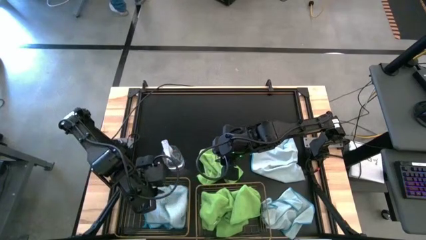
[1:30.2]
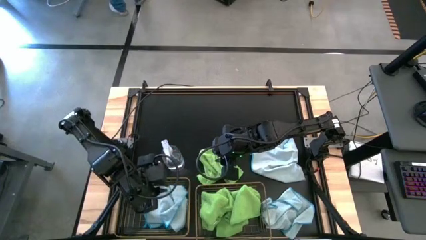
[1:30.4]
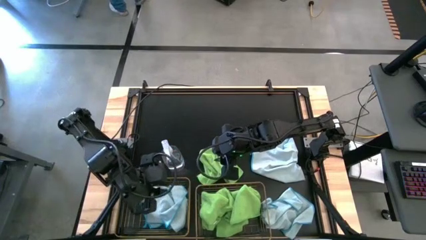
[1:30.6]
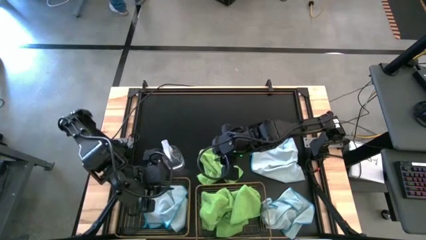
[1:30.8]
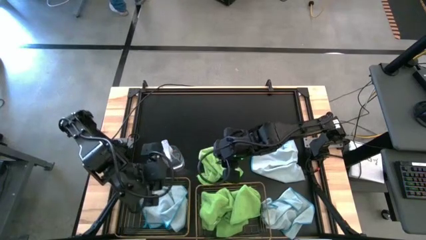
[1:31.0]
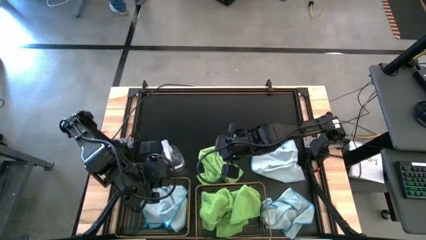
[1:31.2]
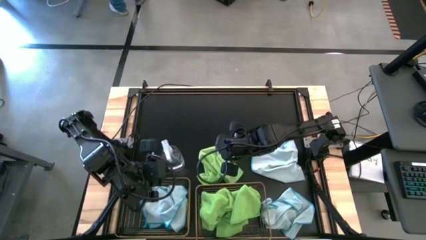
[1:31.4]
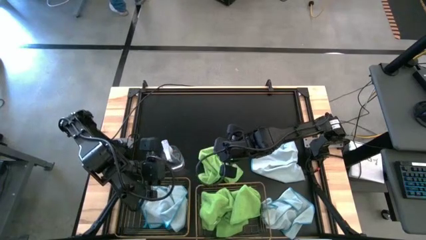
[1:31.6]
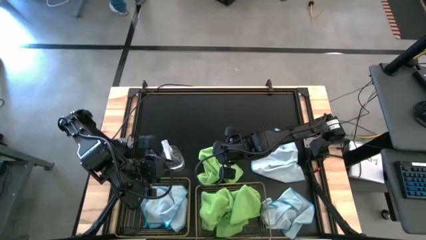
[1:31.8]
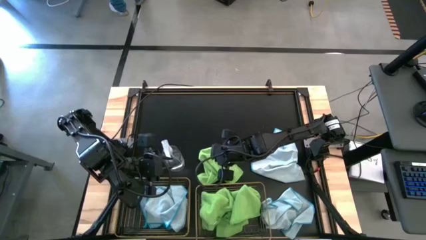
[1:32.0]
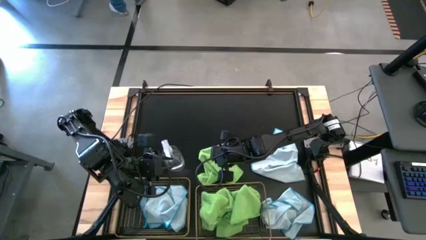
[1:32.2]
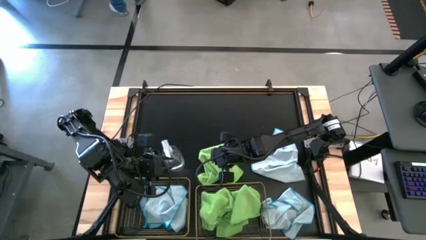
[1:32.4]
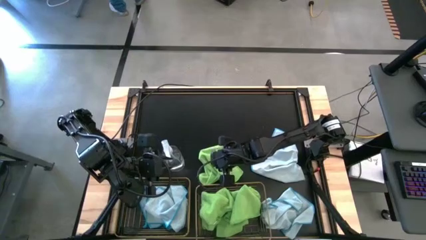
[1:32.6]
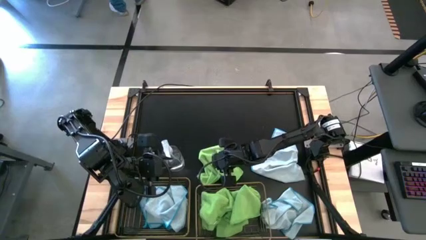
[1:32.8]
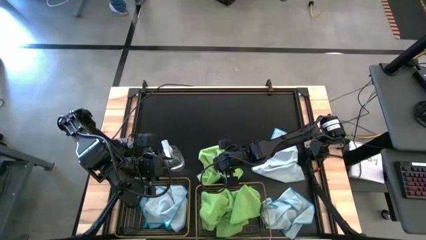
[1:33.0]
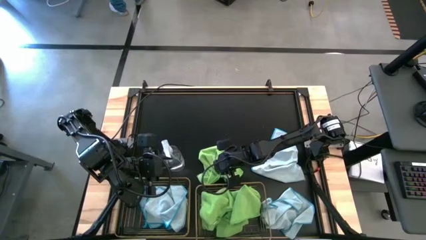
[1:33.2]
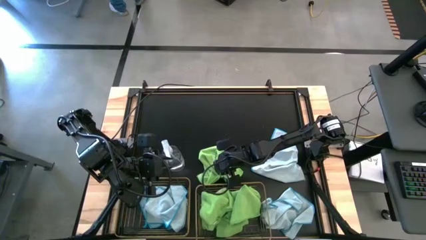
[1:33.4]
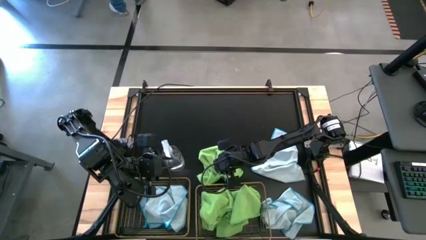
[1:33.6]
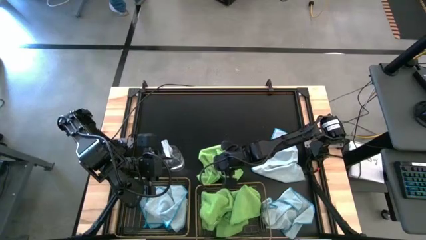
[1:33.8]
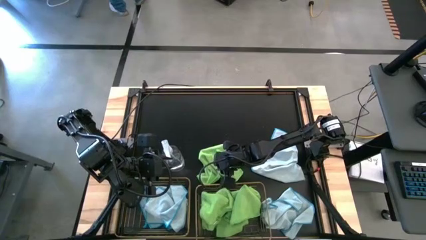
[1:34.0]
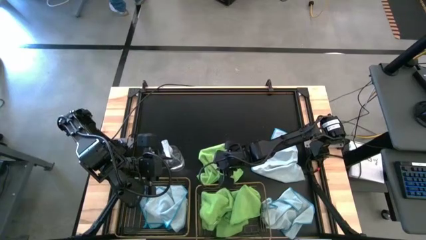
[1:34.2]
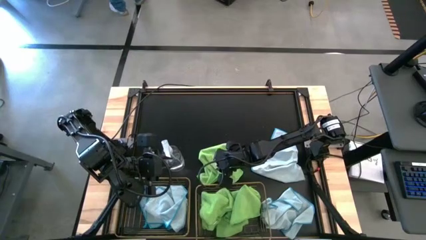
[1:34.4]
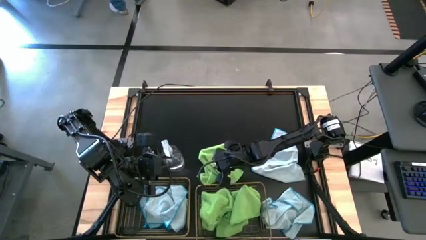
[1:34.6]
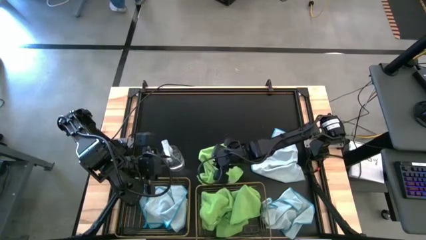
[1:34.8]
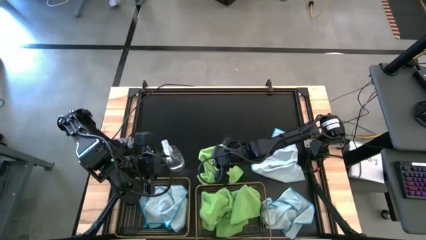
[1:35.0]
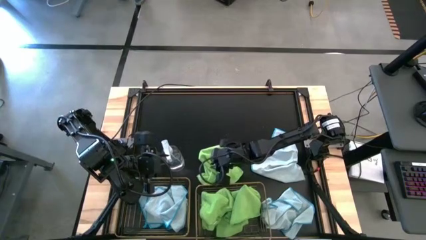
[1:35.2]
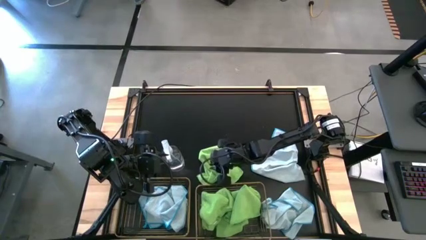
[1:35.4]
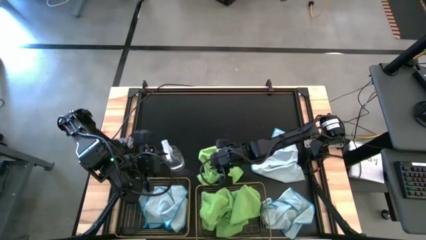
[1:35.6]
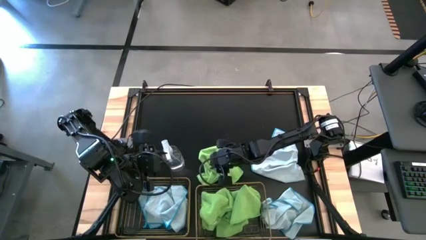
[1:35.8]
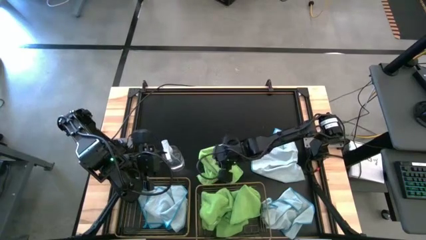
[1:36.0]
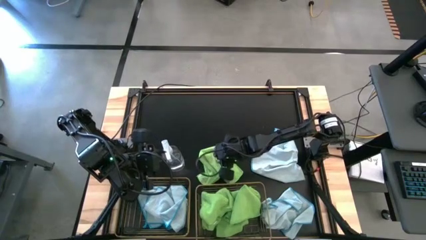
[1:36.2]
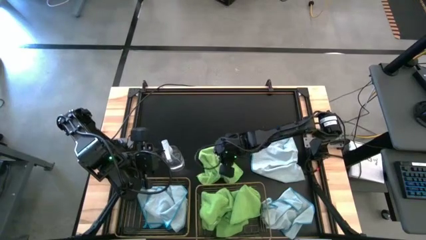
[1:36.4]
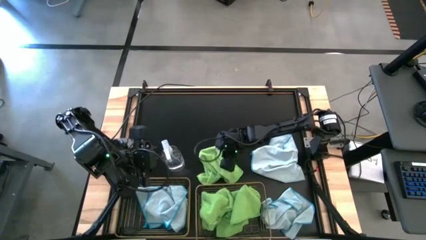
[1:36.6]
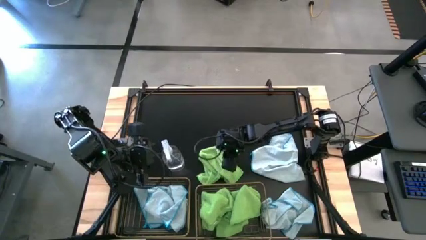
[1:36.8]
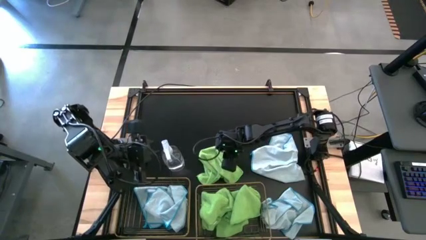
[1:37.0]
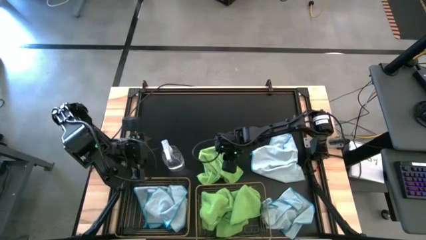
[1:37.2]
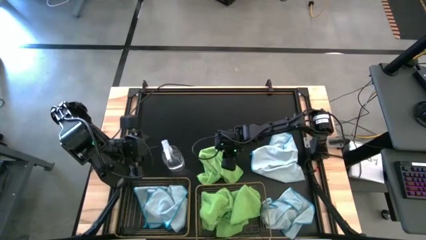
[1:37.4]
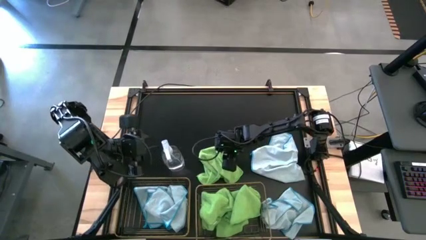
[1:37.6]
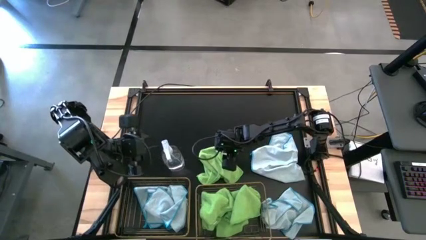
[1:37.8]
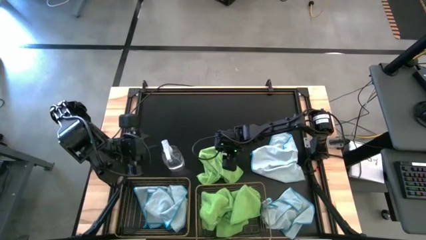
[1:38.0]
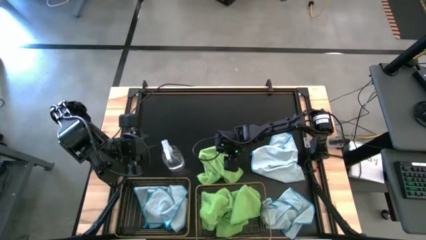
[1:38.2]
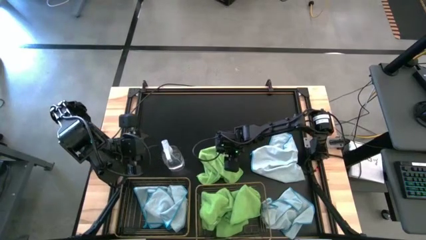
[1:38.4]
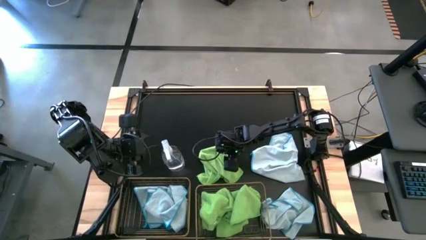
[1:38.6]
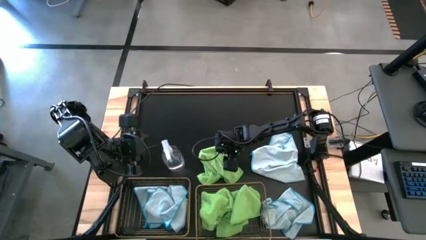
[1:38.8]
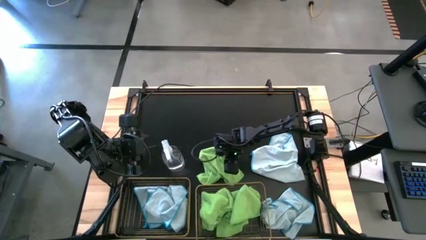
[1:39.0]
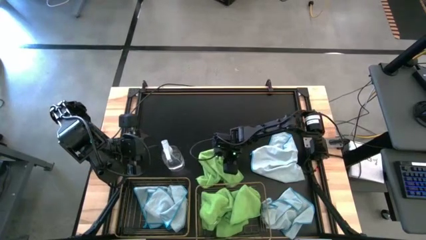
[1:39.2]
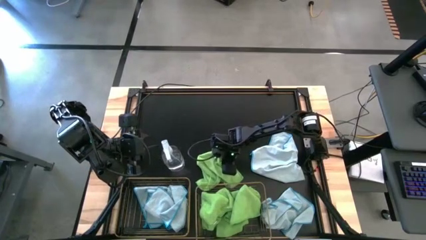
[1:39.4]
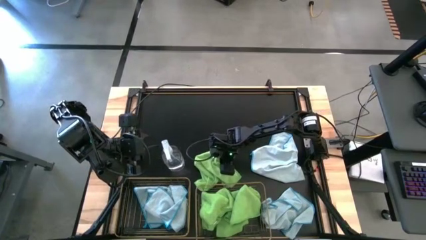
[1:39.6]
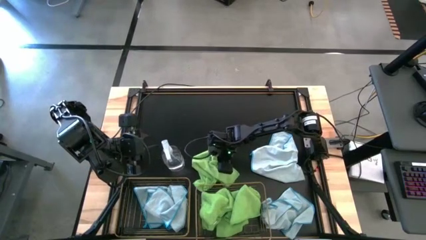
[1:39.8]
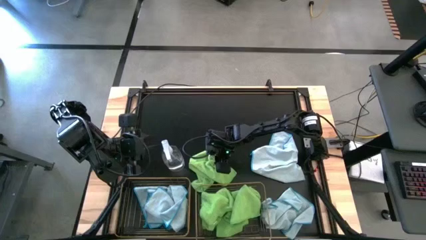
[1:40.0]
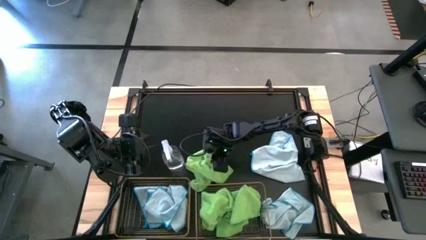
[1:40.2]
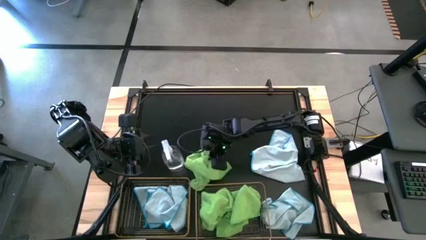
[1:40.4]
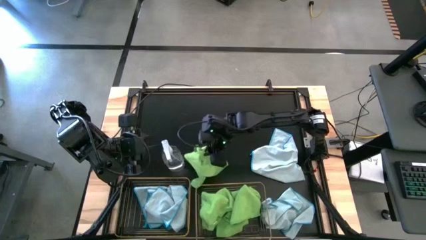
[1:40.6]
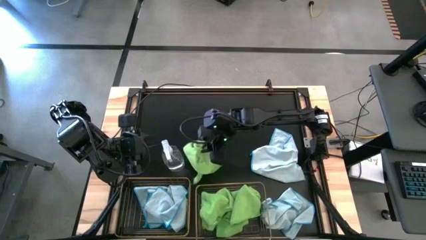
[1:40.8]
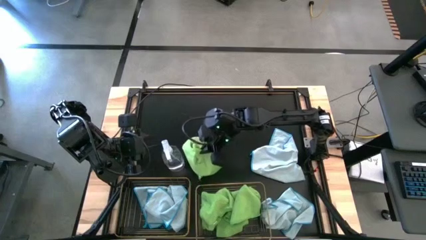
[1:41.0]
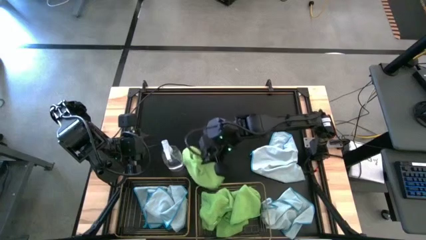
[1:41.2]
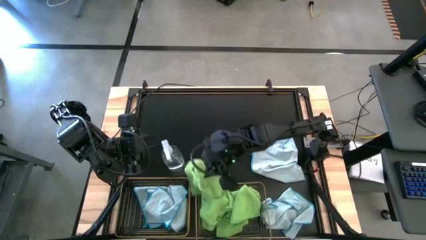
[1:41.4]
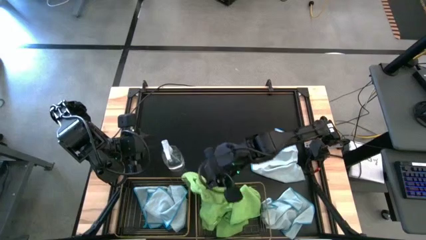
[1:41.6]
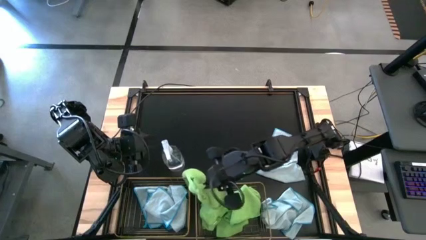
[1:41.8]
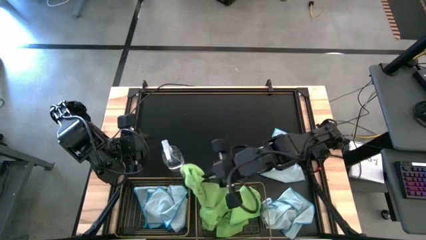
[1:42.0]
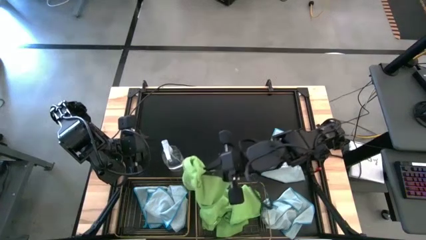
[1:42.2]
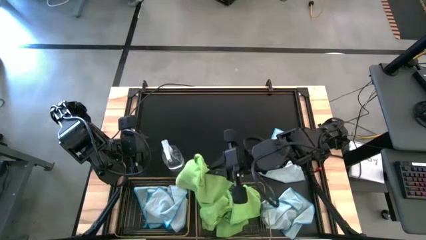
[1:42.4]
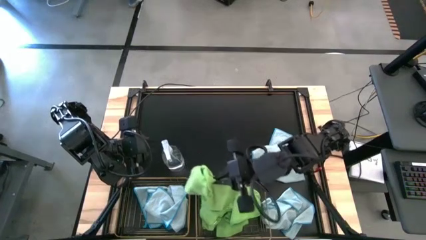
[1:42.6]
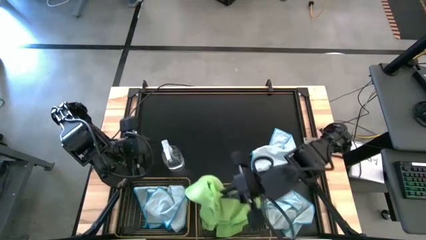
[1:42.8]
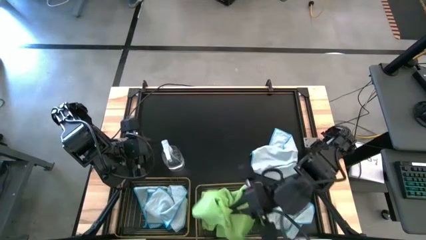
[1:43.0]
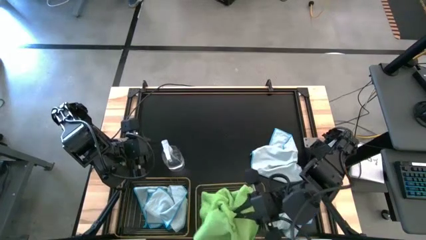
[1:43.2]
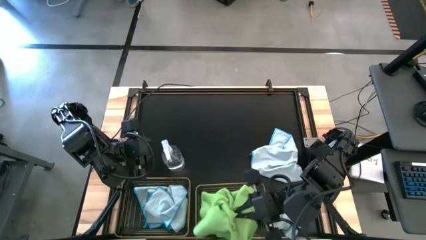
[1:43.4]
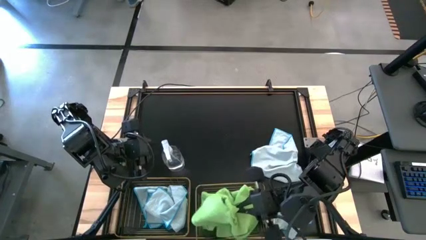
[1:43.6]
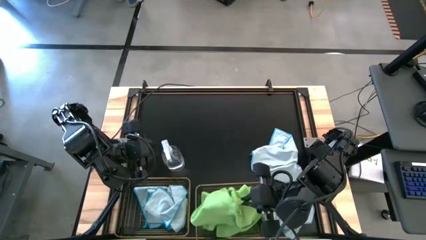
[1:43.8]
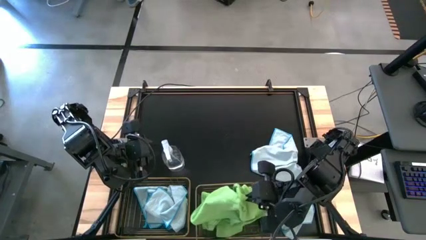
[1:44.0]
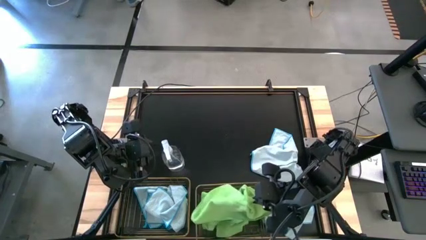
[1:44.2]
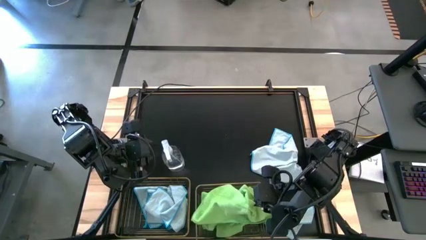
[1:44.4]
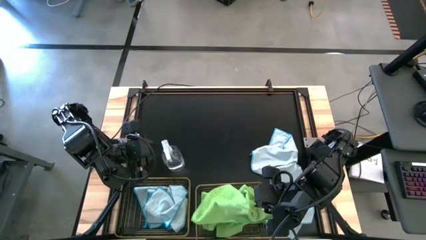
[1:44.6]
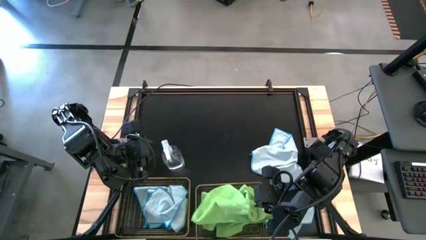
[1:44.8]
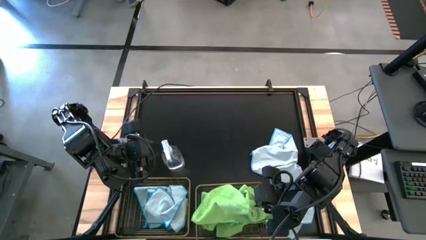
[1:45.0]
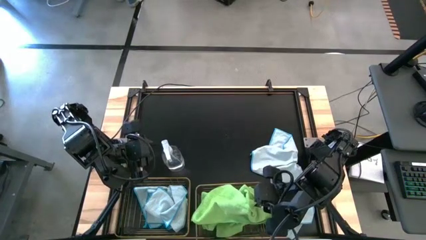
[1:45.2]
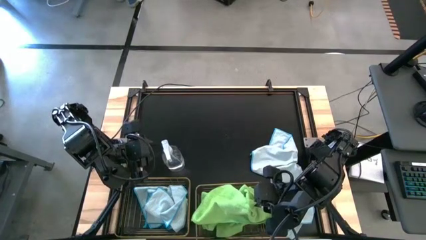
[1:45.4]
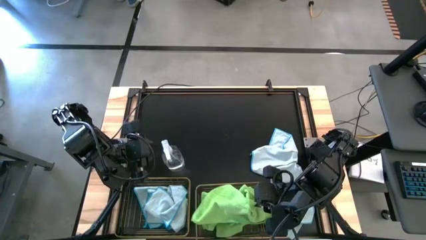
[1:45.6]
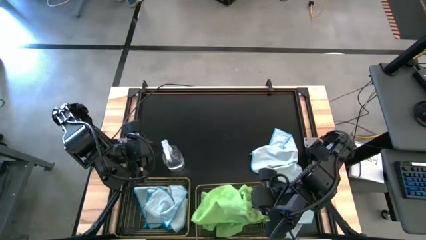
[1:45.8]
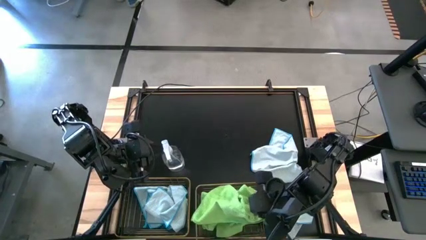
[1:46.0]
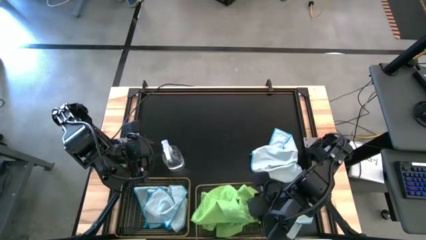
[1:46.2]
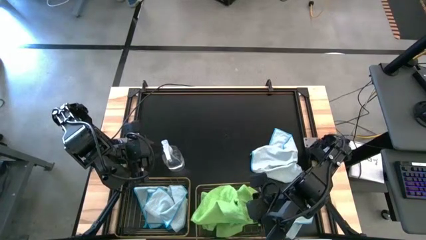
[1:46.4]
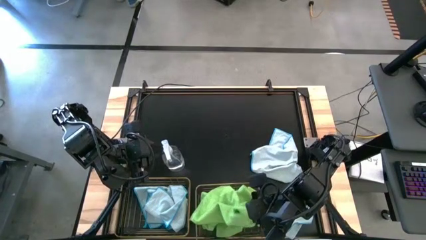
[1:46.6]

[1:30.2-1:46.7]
Task: Sort microfiber towel by color & place in baskets
Put the green microfiber cloth into the right wire basket
